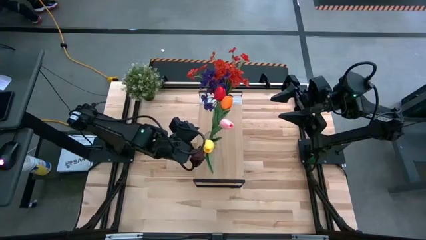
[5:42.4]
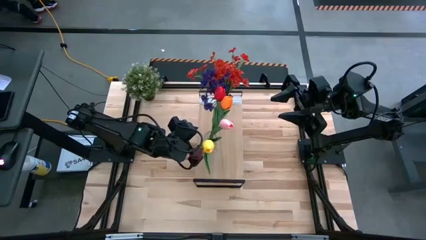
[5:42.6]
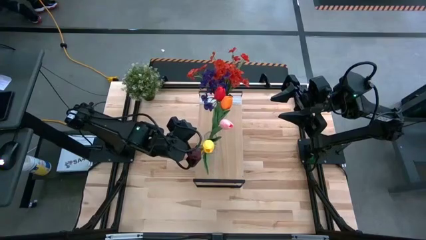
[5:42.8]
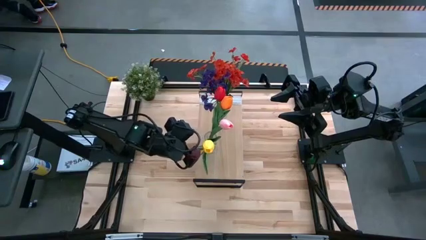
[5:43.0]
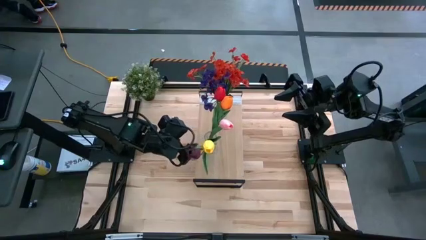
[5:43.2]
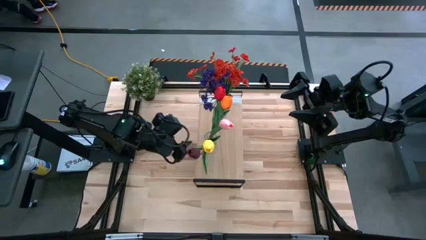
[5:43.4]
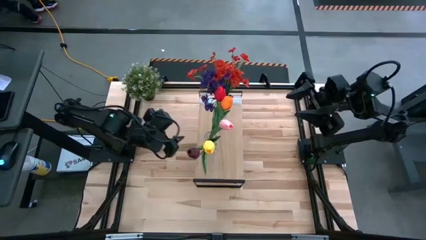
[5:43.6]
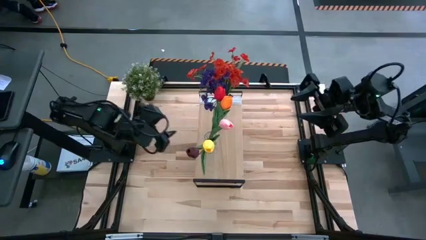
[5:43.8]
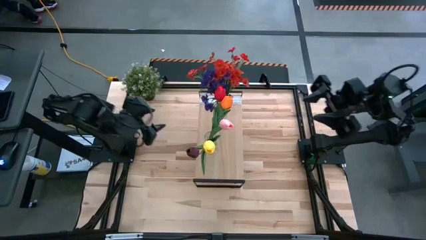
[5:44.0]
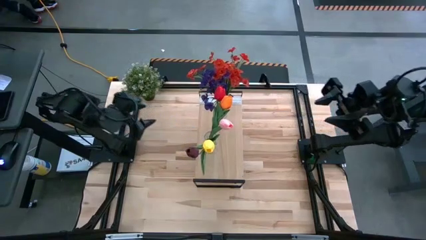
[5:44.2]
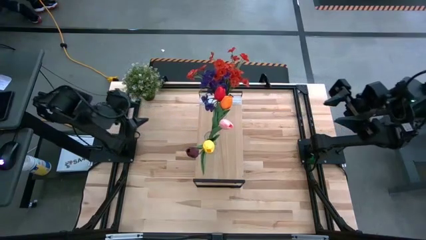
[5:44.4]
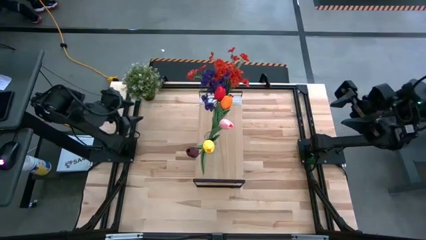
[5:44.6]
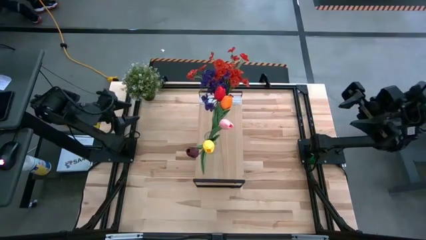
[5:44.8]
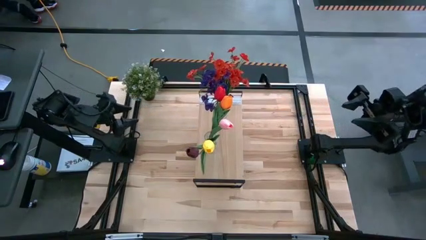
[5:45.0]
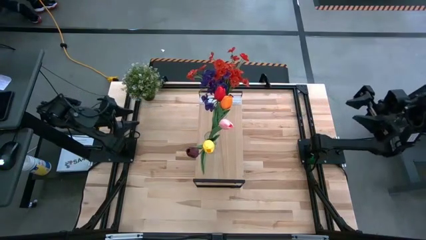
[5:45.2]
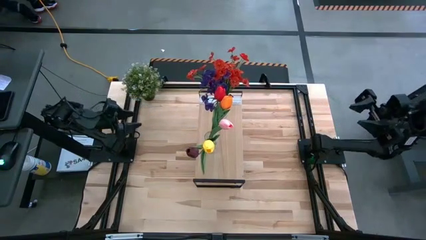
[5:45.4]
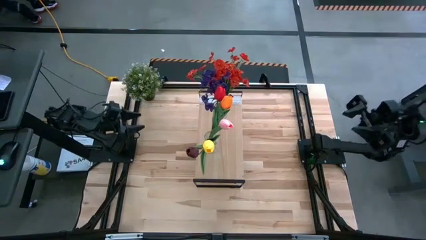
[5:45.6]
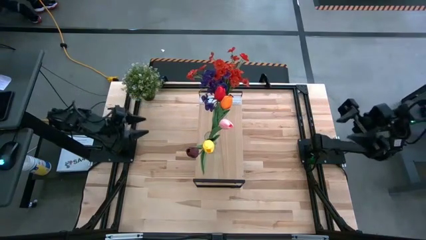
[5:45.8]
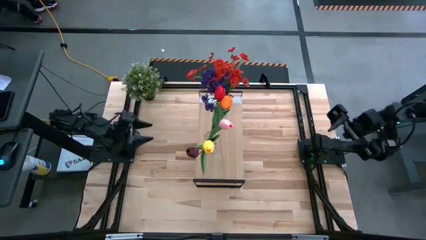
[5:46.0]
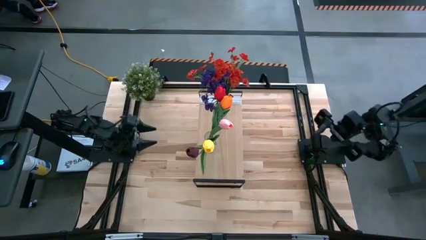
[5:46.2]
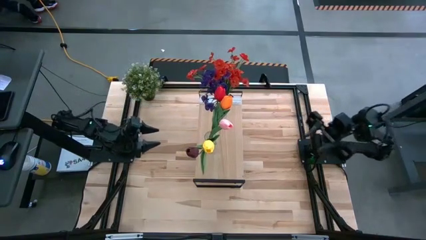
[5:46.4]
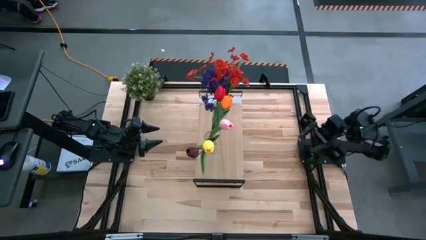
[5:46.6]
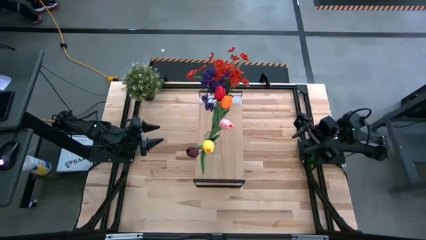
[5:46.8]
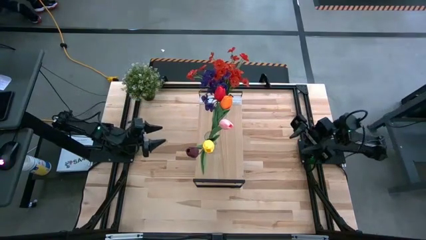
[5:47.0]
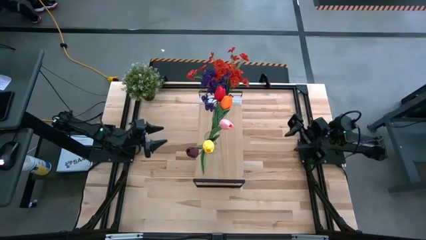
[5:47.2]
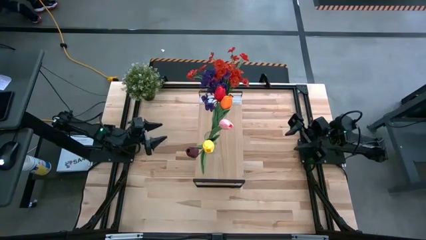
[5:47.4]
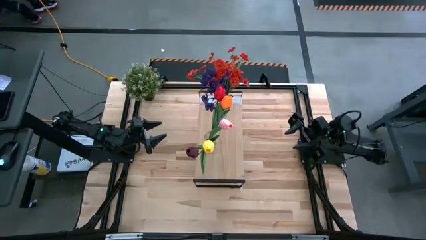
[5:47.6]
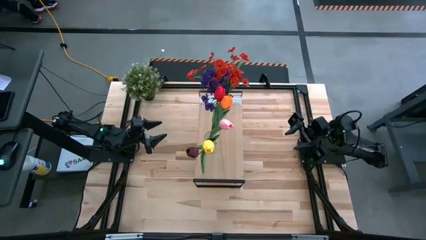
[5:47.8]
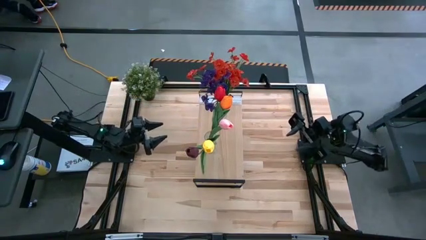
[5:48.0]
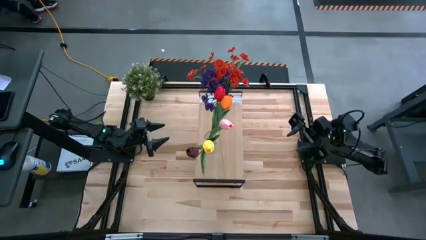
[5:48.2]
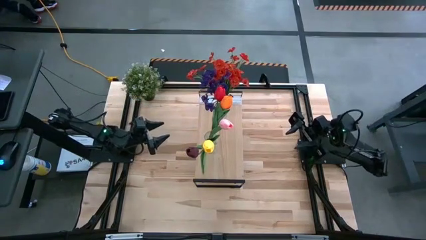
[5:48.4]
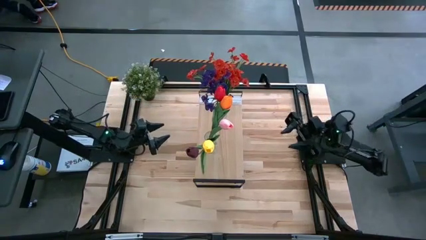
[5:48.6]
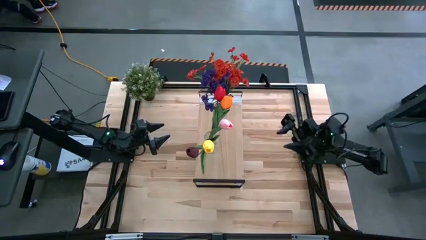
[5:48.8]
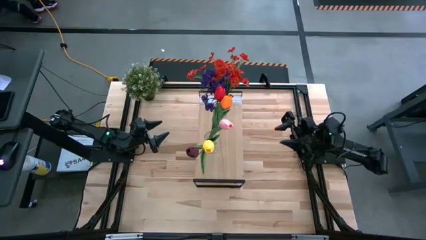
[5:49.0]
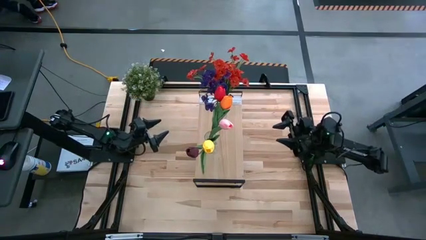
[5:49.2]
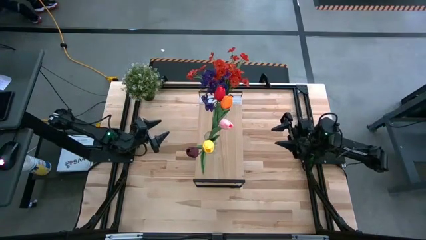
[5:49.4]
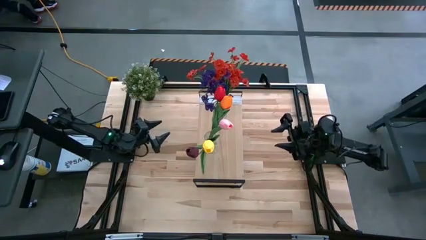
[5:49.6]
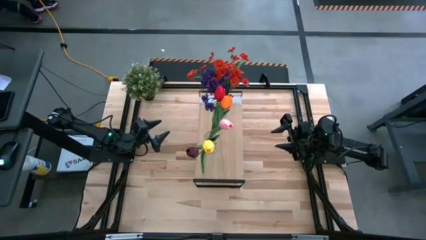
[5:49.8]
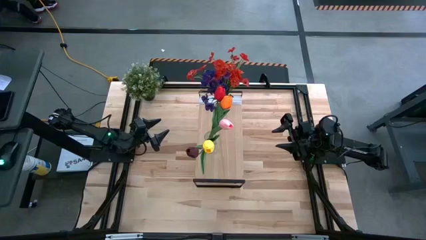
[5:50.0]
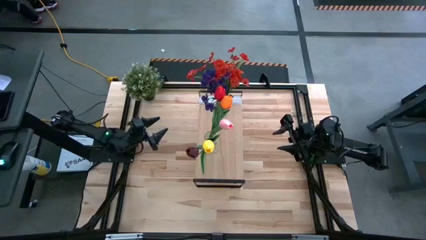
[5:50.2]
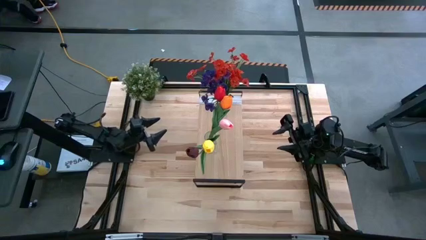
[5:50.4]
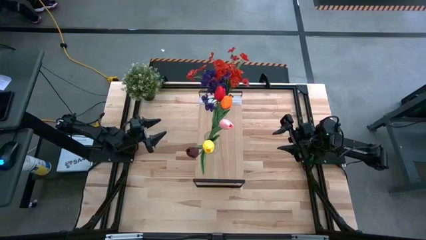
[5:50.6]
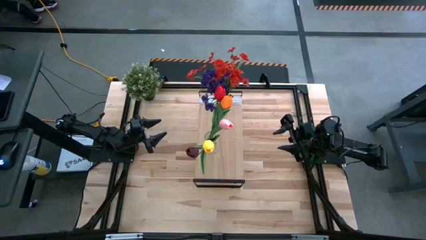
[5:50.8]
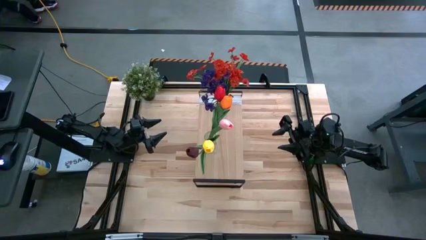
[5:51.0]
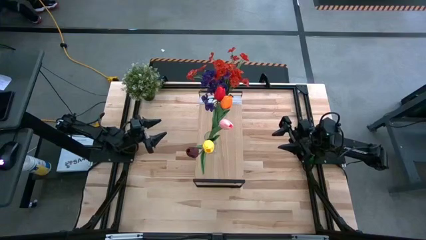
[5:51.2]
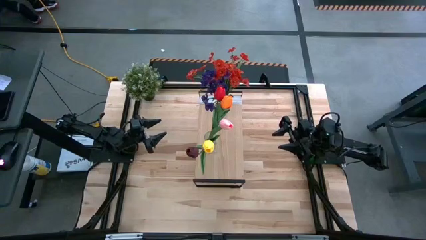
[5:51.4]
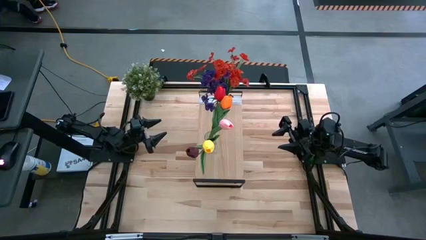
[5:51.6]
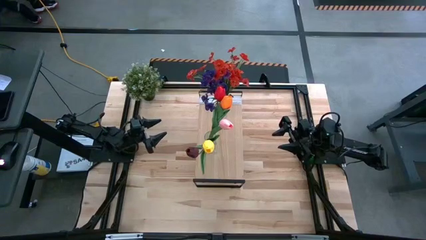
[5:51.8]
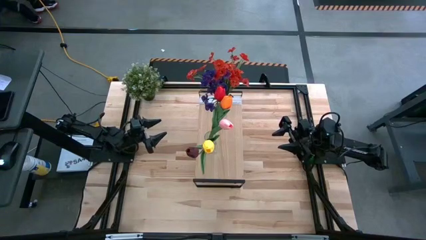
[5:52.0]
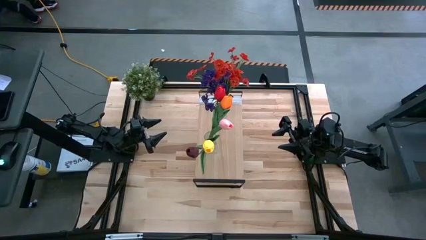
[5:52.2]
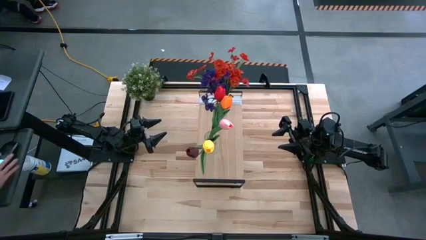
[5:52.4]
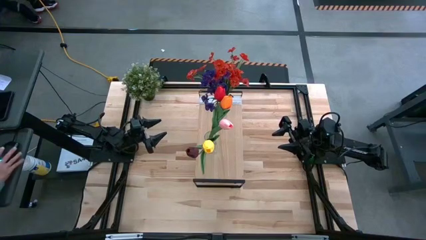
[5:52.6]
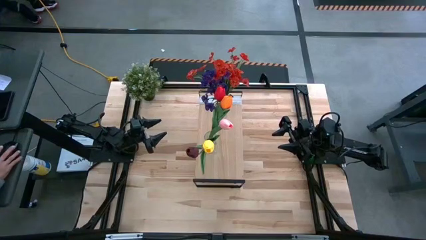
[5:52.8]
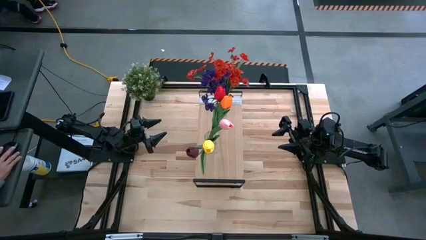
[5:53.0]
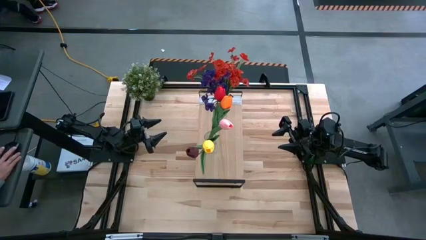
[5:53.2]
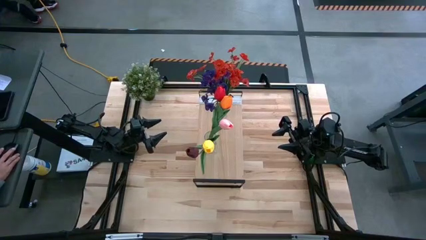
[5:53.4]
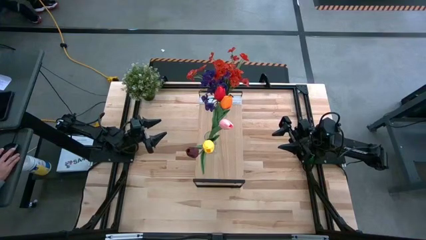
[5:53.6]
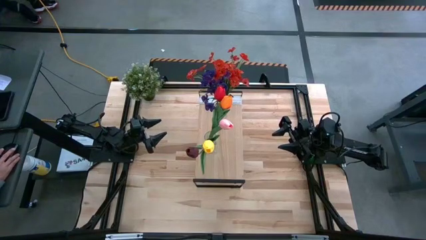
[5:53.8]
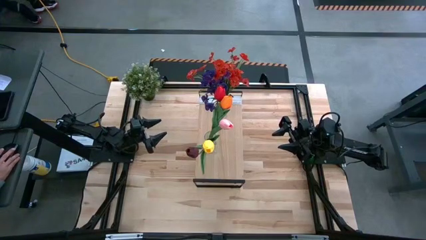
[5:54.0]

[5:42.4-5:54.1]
Task: Pick and place flowers into a vace then onto a shelf
Return to Home Position

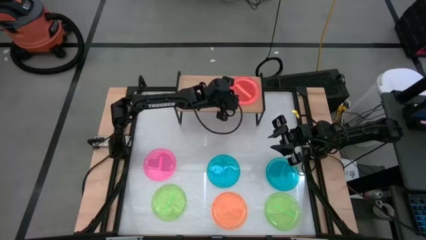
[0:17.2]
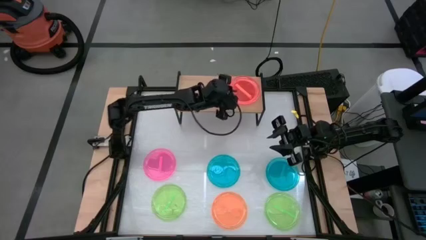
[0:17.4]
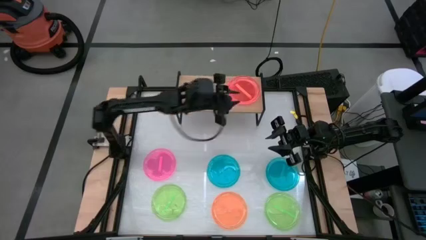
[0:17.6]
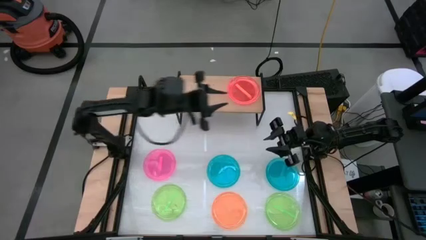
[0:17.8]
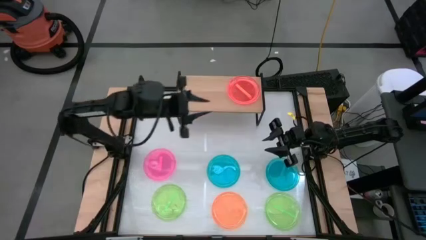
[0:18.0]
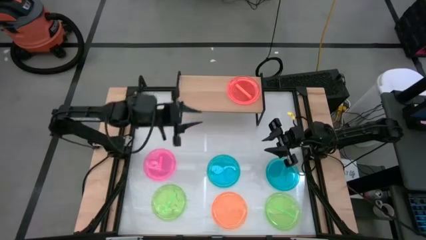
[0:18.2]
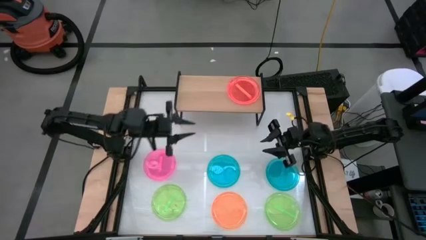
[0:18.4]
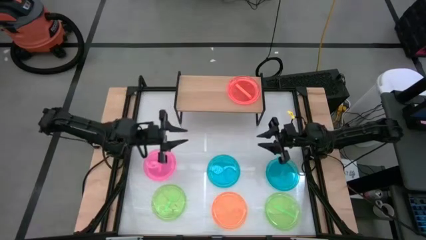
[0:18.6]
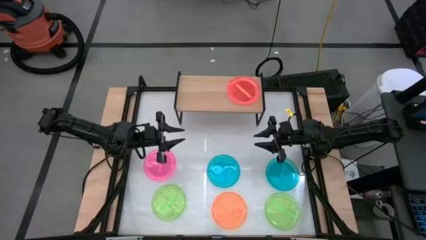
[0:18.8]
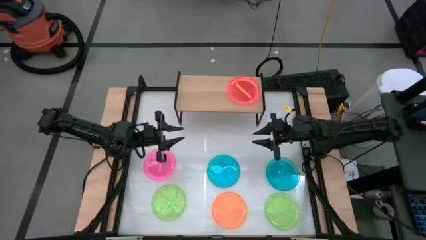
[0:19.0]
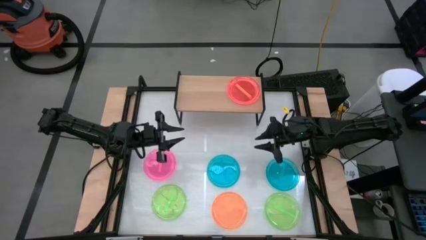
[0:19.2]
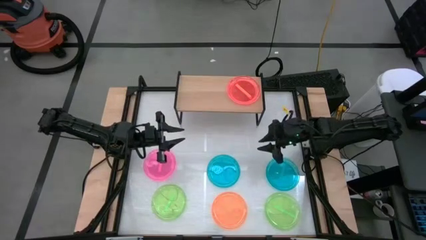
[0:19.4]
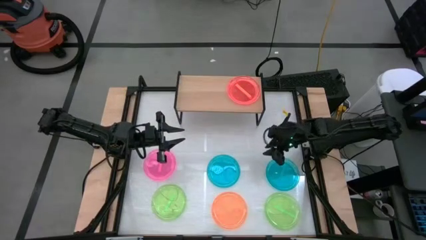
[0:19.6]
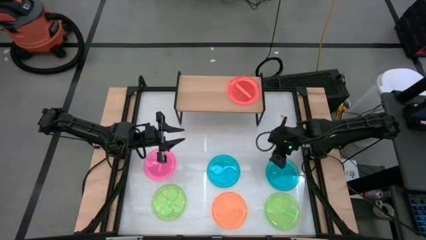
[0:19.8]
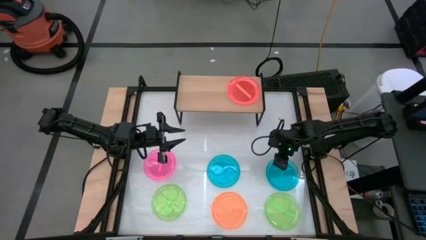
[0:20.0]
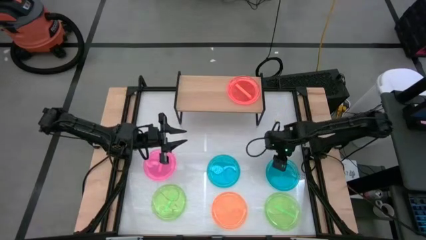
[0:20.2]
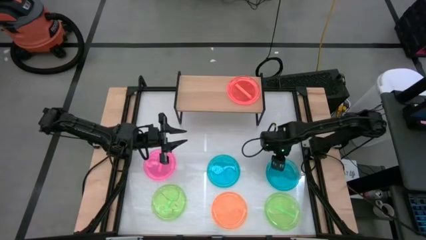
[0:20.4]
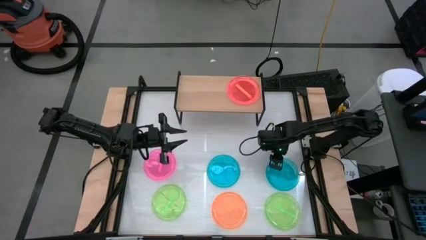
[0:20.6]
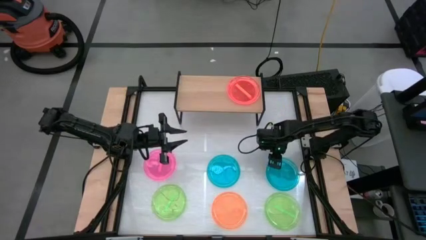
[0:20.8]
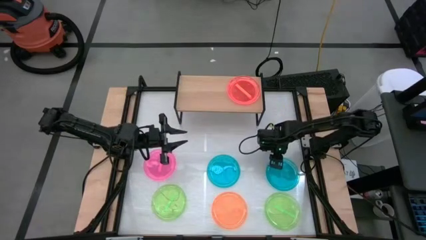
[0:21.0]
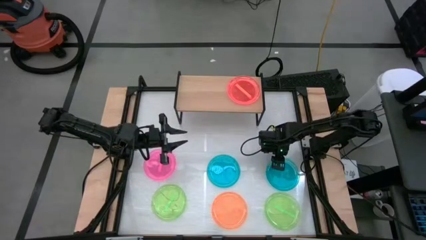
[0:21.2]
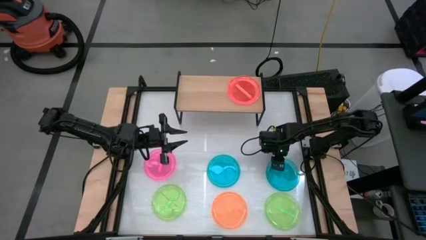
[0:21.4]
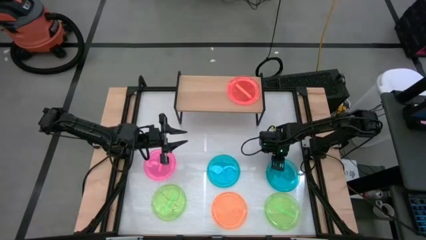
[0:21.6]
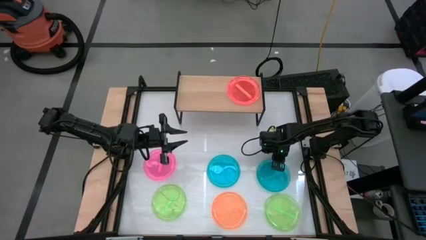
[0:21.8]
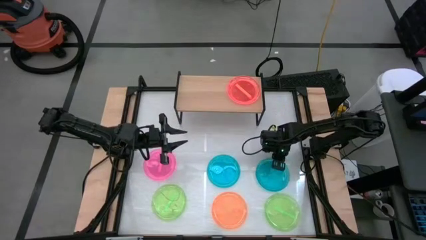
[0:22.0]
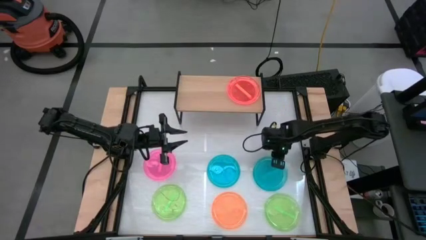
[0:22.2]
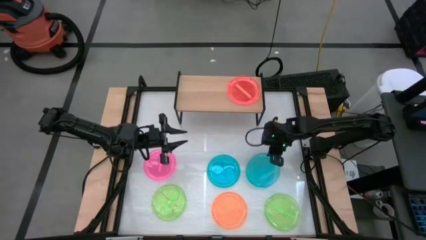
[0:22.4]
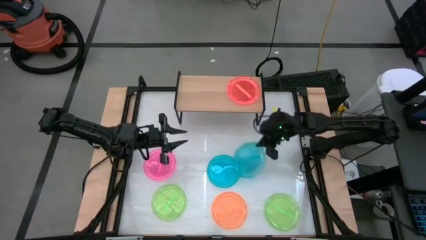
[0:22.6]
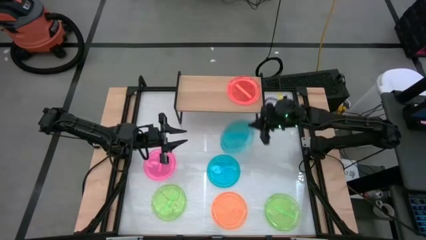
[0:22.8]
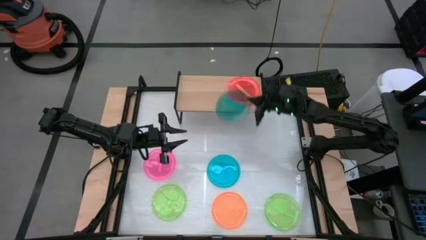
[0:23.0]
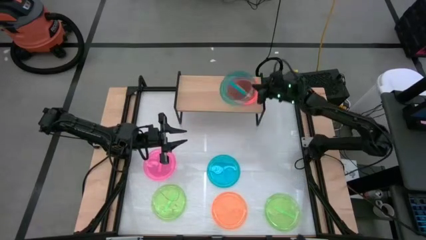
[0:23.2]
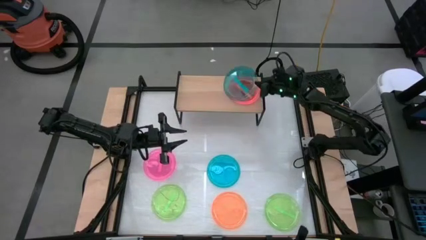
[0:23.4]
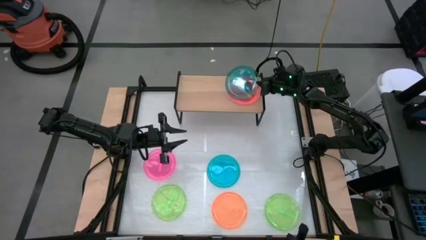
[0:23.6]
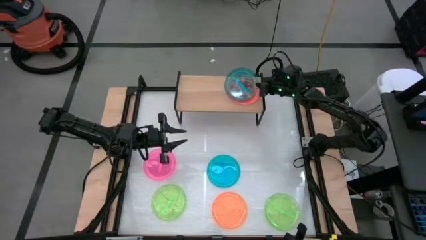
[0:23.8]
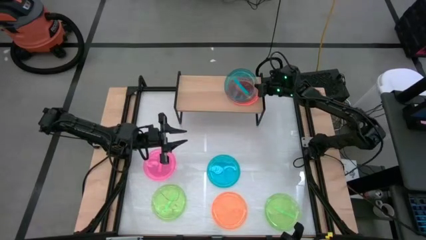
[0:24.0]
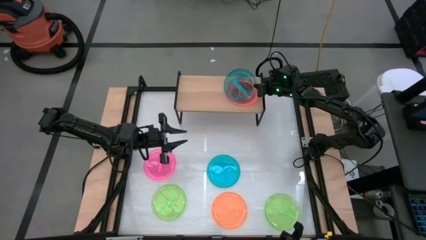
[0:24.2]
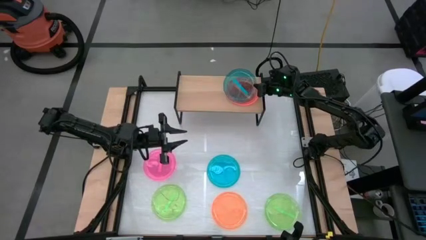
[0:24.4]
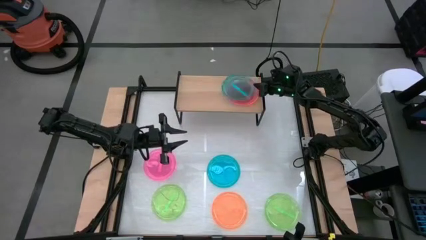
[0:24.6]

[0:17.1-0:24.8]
Task: Place and stack plates onto a shelf
Stack the right blue plate on top of the orange plate on the shelf
